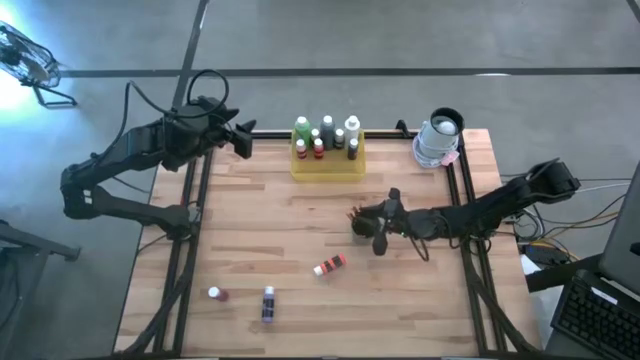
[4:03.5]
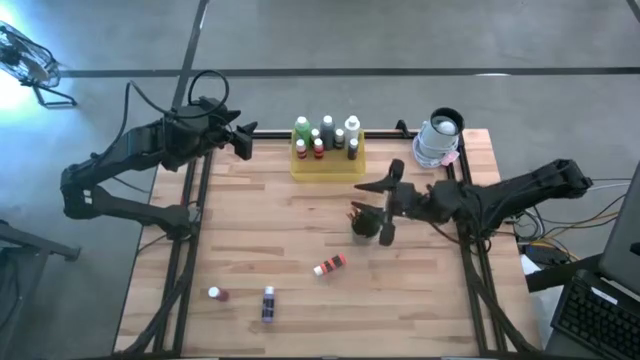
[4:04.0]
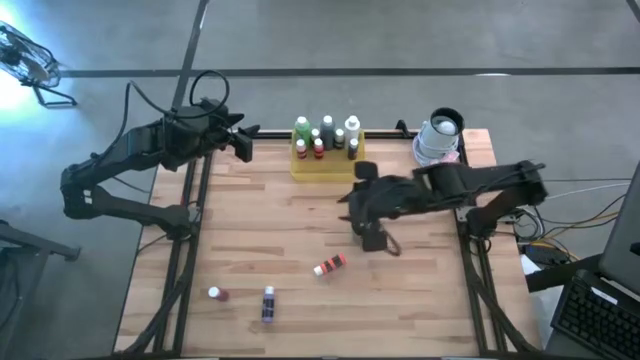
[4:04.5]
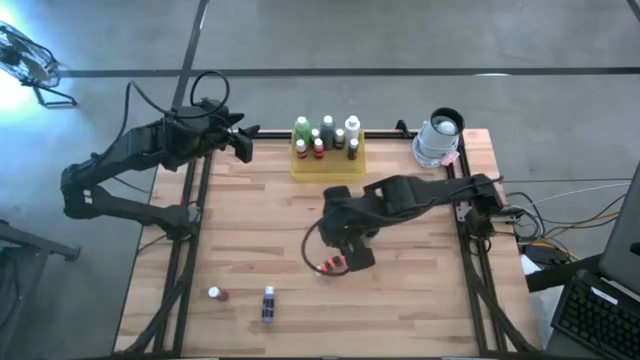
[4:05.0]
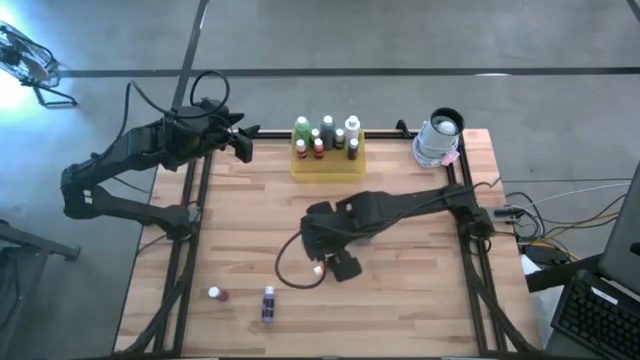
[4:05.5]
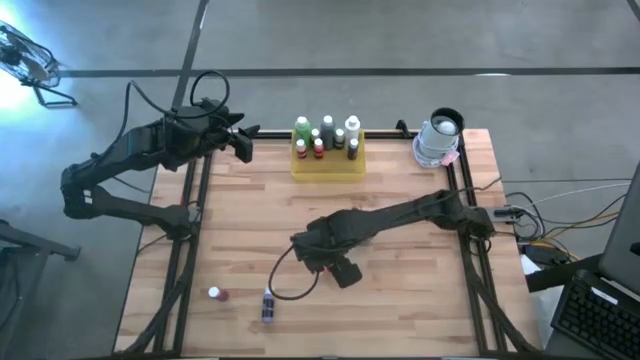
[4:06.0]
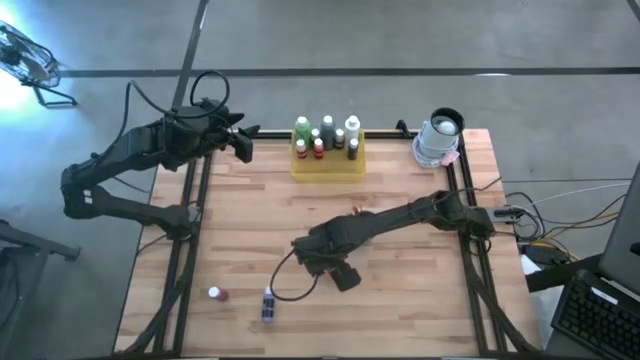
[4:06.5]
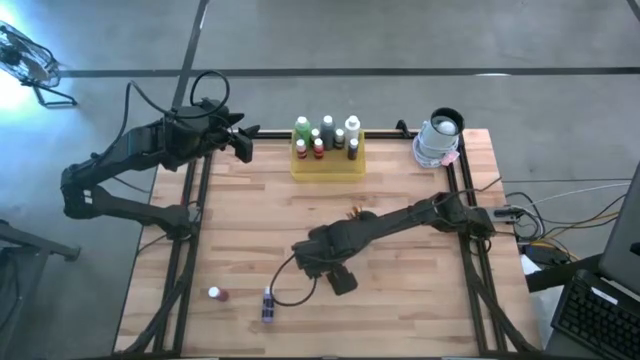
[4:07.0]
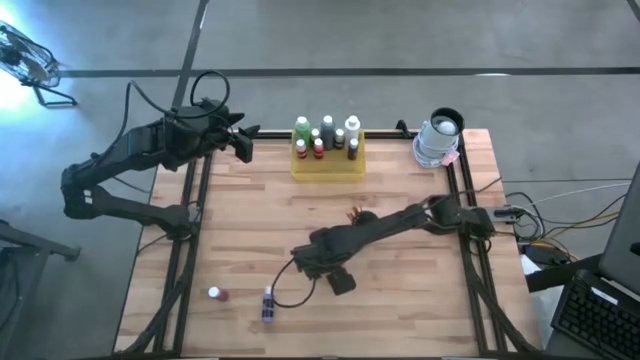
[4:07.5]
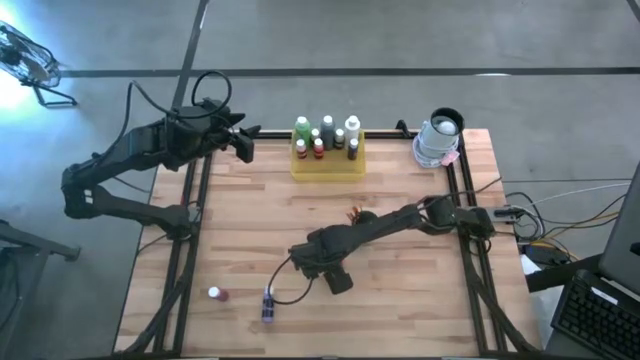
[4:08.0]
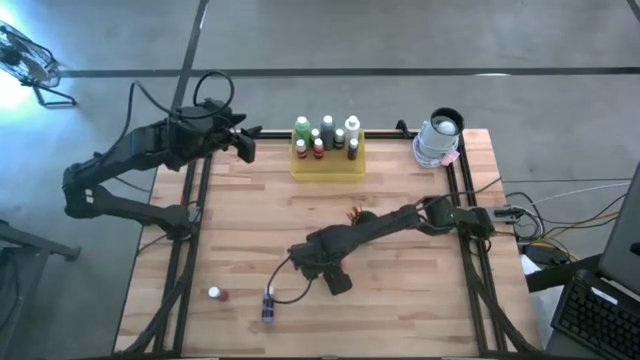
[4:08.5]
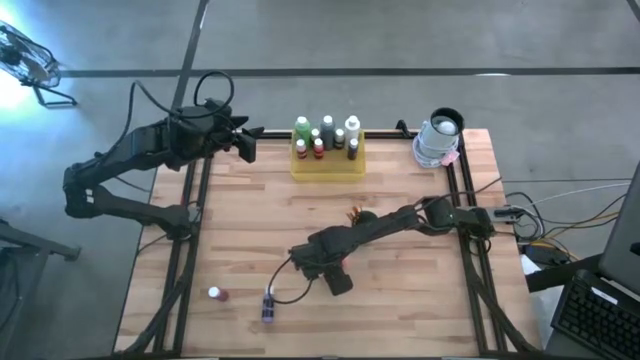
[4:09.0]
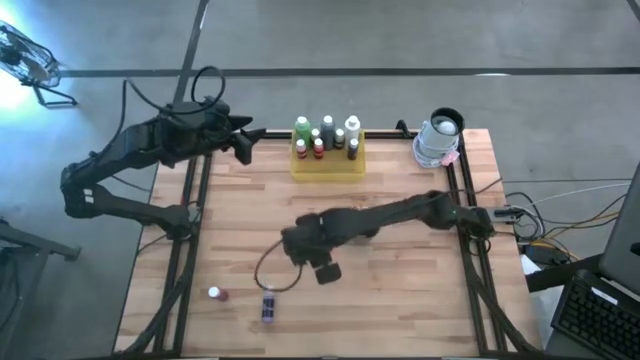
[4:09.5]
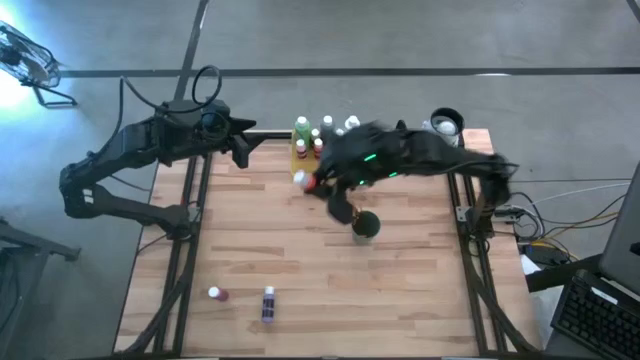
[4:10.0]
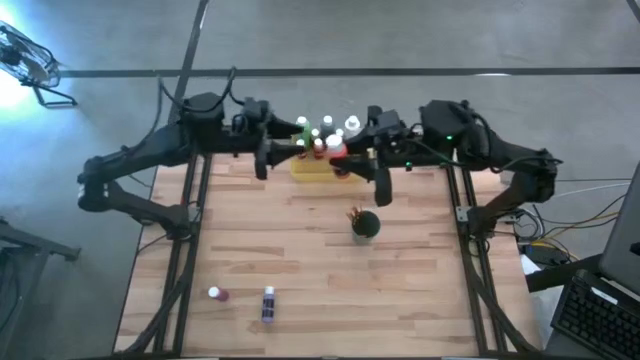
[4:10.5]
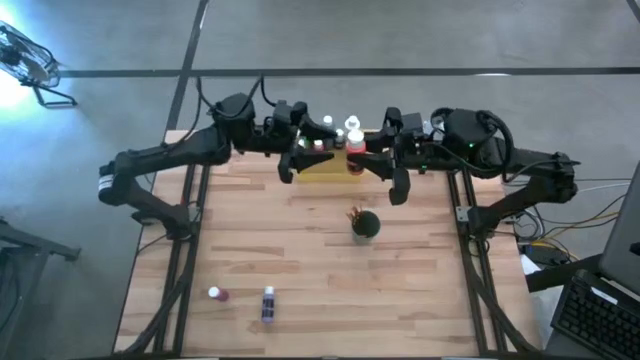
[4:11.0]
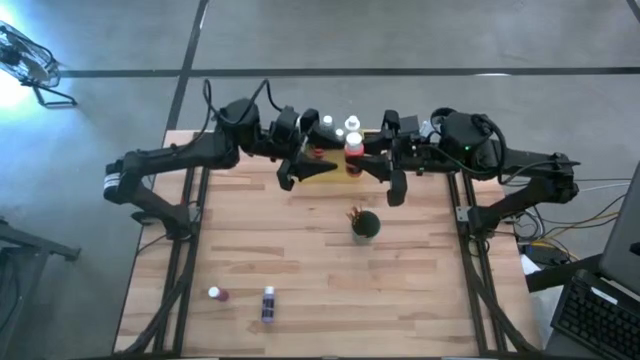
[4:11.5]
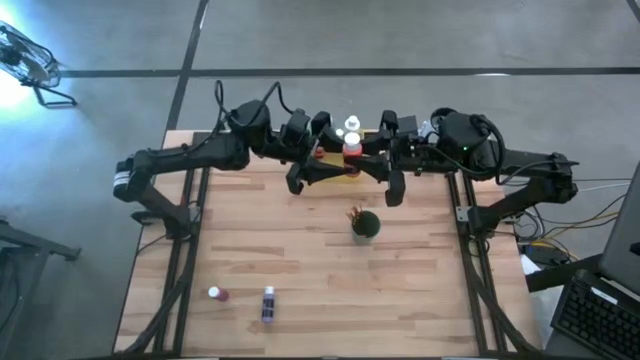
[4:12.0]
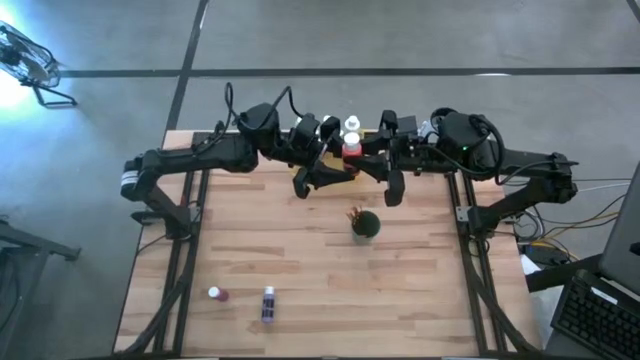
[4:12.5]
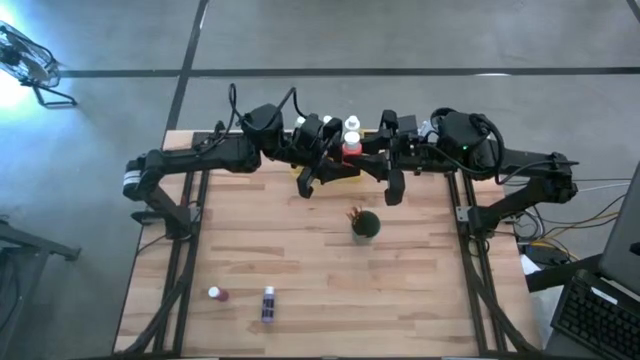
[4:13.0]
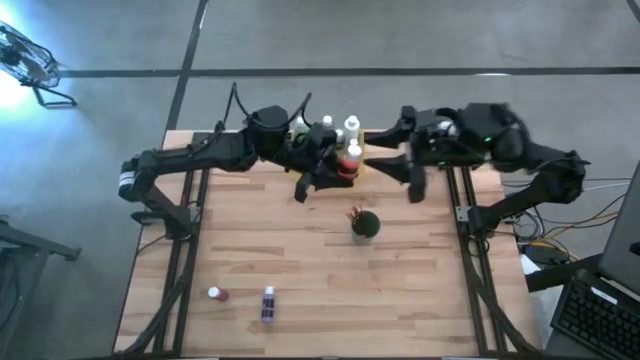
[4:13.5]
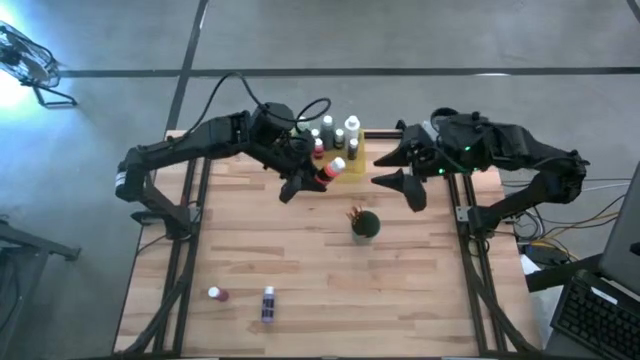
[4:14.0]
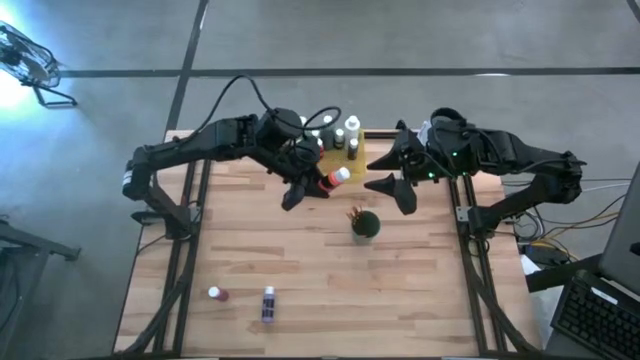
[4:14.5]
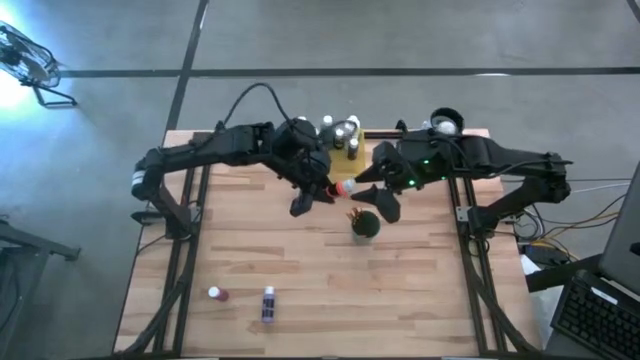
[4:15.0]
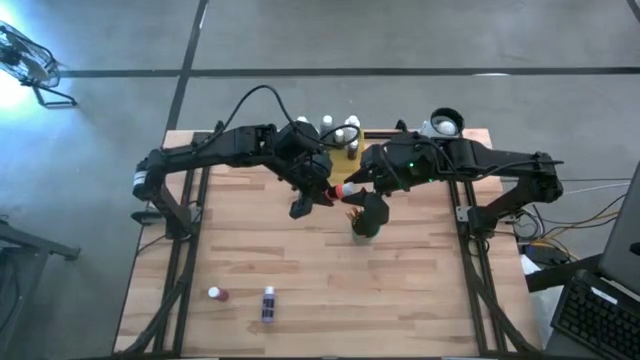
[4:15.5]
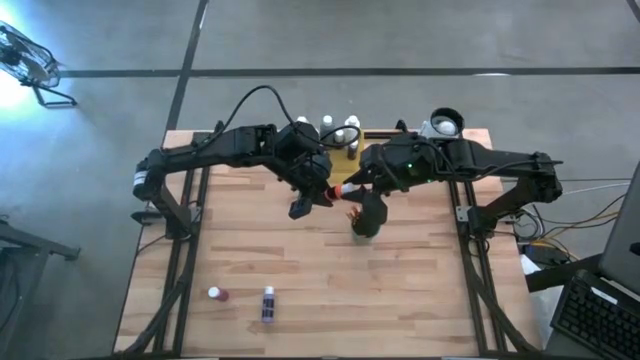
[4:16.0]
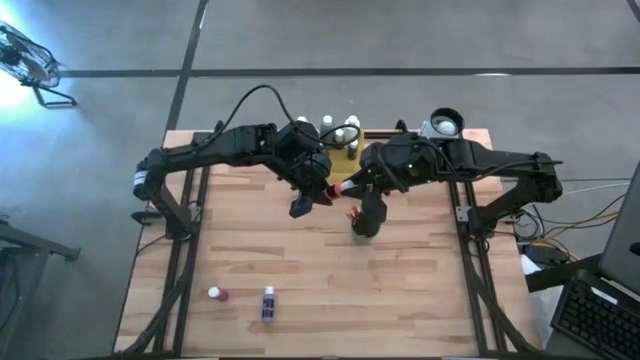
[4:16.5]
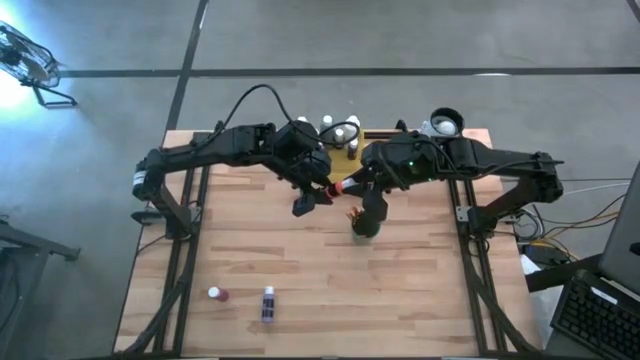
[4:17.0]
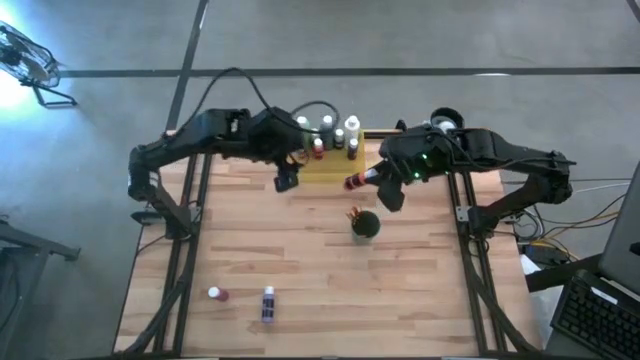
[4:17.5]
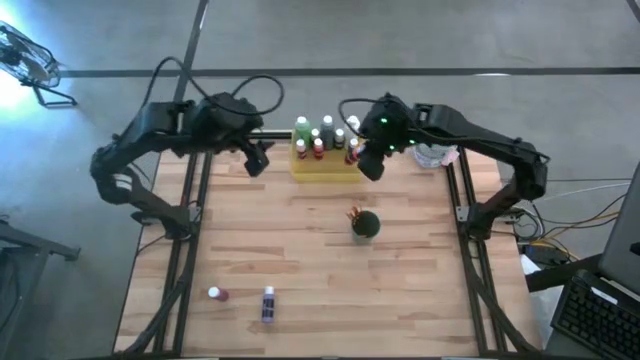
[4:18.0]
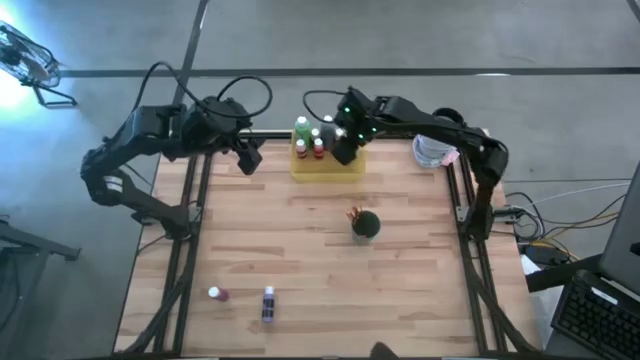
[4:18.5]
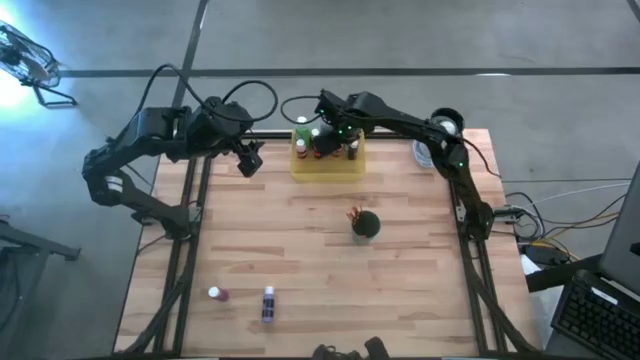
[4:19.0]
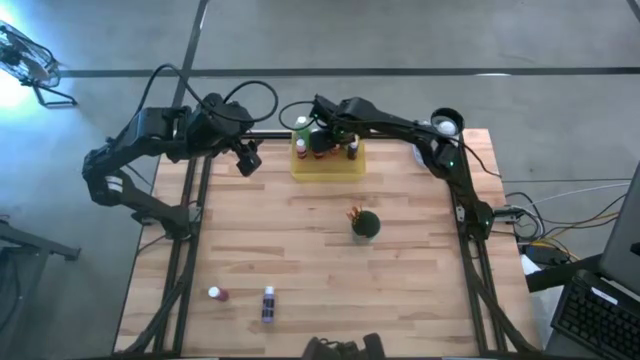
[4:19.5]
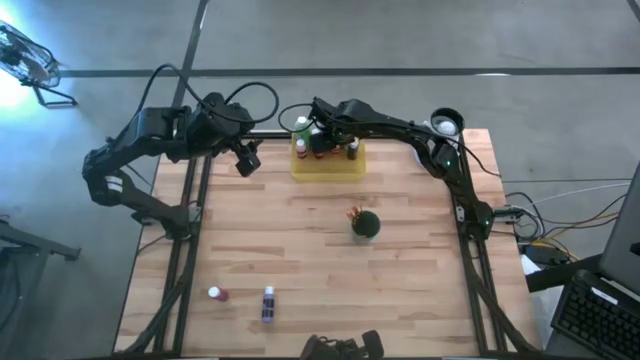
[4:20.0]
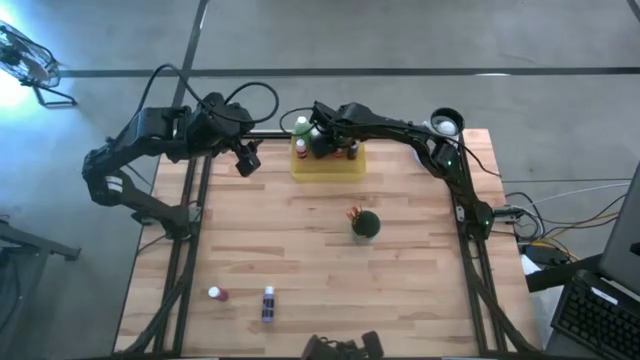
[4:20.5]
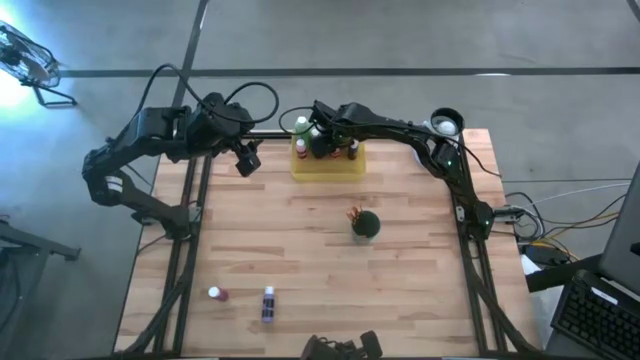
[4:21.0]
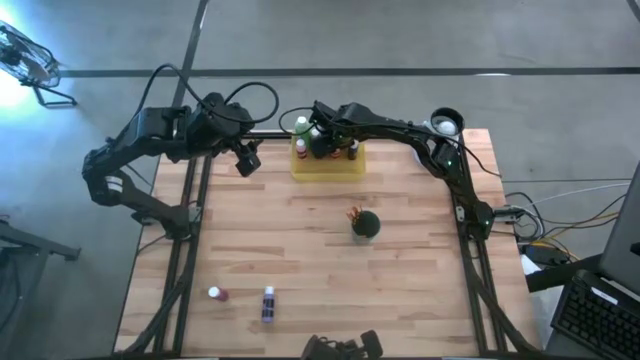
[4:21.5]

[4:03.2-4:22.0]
Task: Pick & Place Paint Supplies
Put the orange paint bottle into the yellow bin

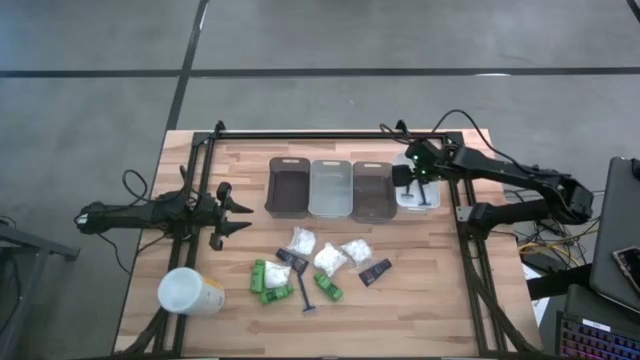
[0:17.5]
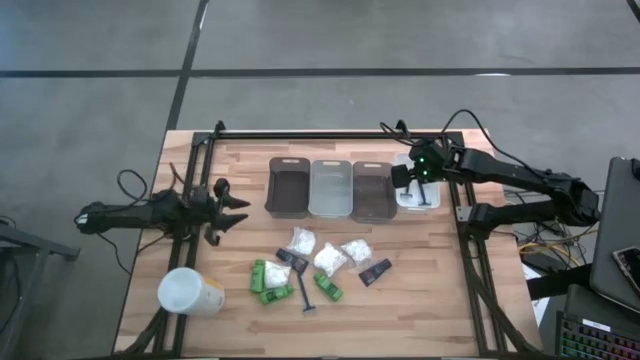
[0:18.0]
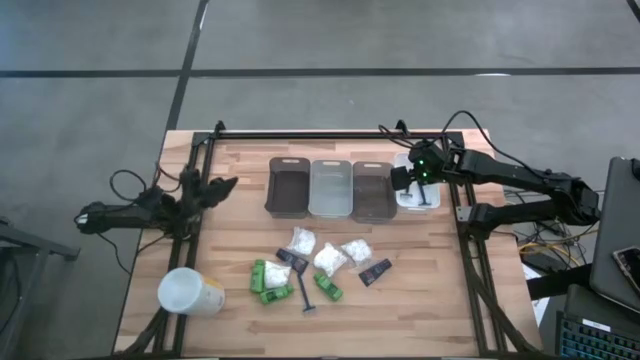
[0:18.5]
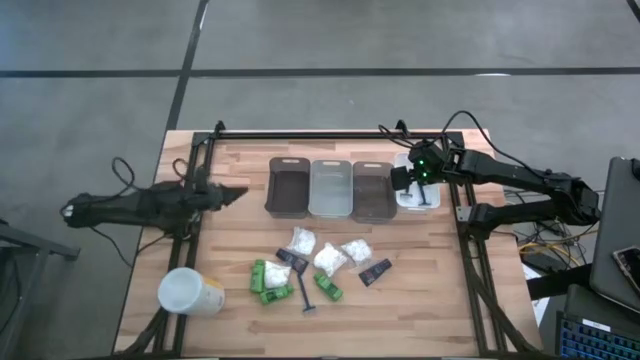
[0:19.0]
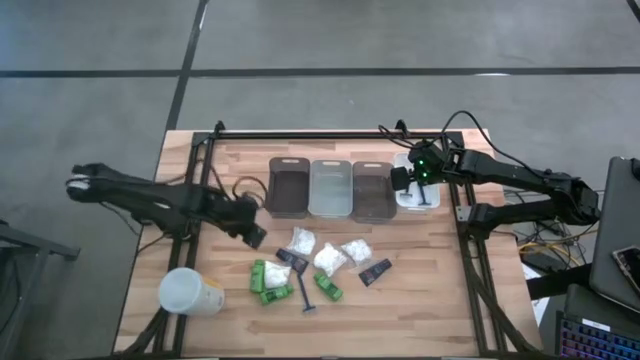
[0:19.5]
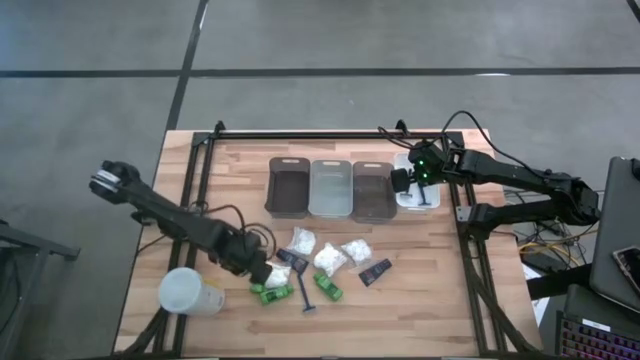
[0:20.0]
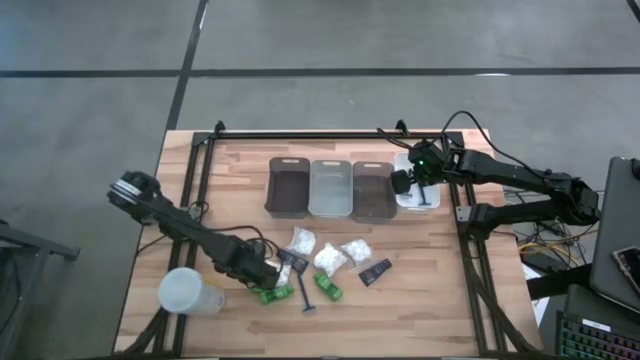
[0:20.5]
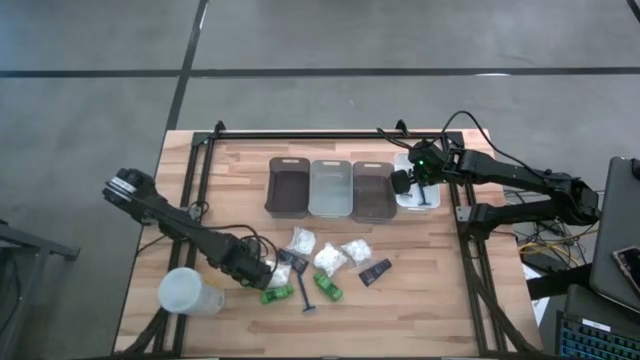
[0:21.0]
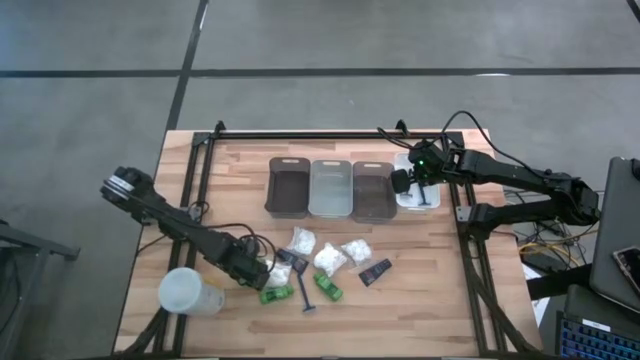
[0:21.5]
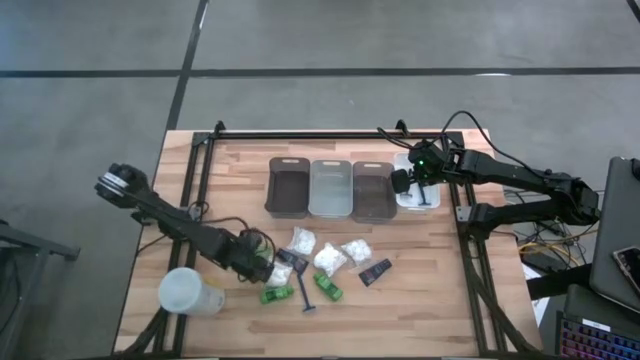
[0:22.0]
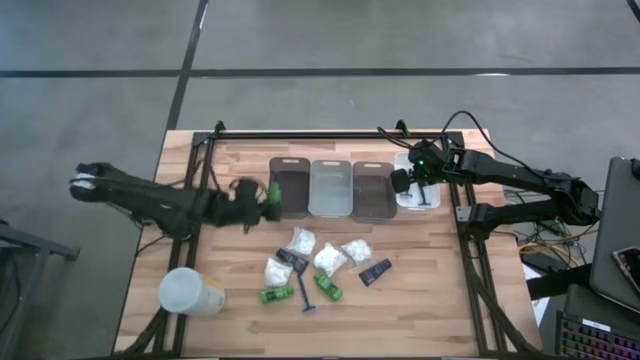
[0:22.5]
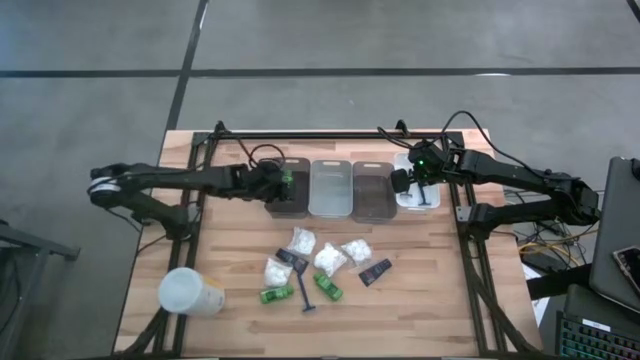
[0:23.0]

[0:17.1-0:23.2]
Task: Pick & Place Travel size toiletries
Put the left green shampoo into the left black bin
